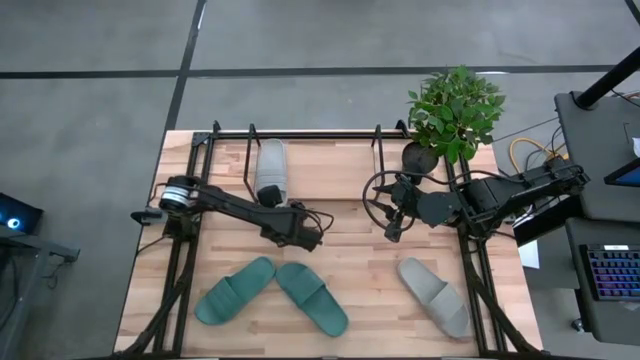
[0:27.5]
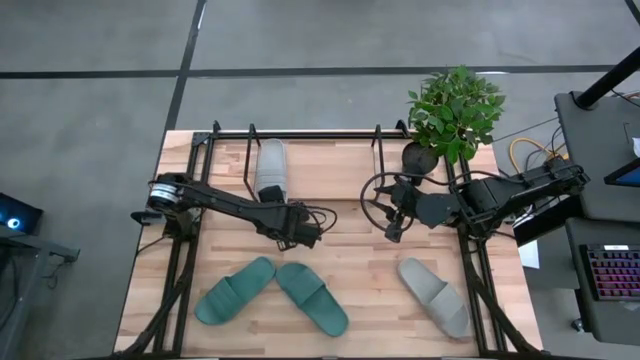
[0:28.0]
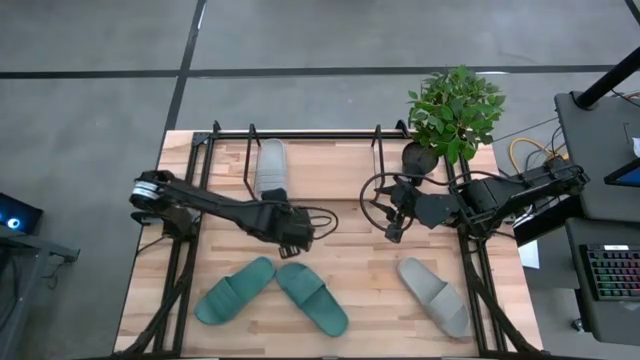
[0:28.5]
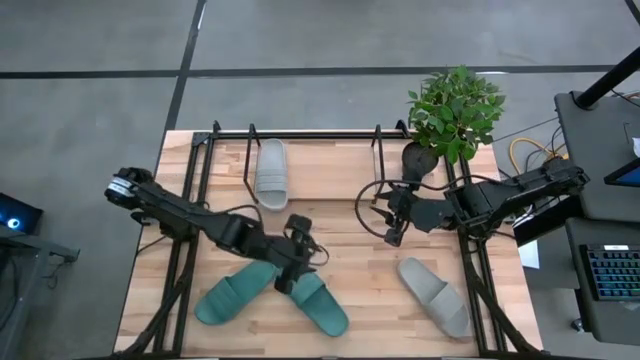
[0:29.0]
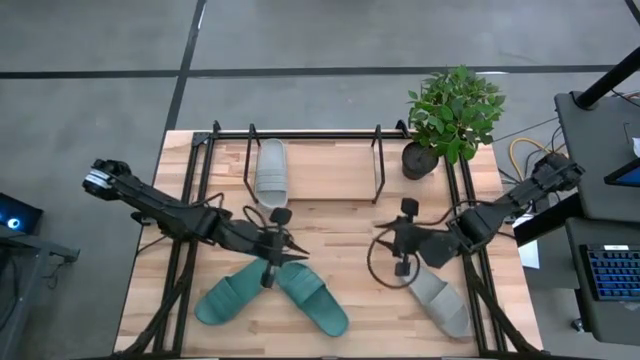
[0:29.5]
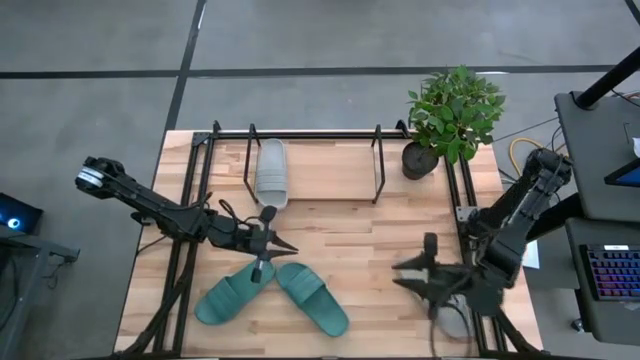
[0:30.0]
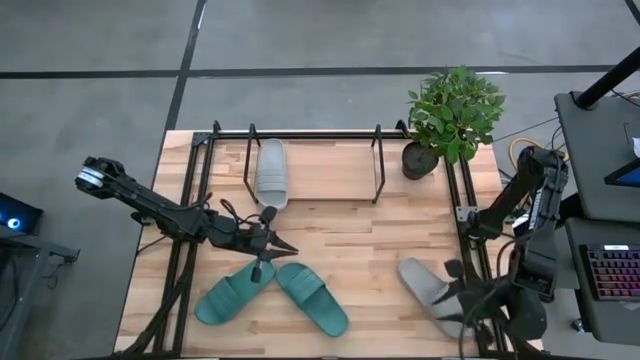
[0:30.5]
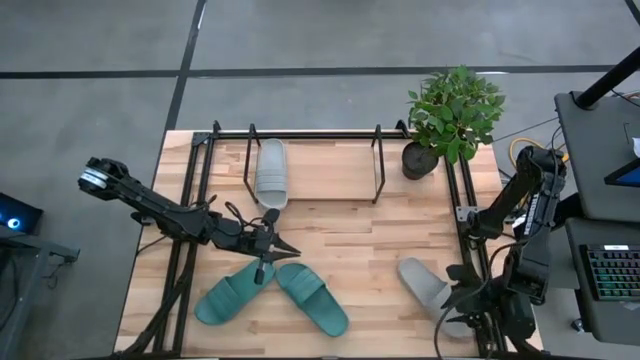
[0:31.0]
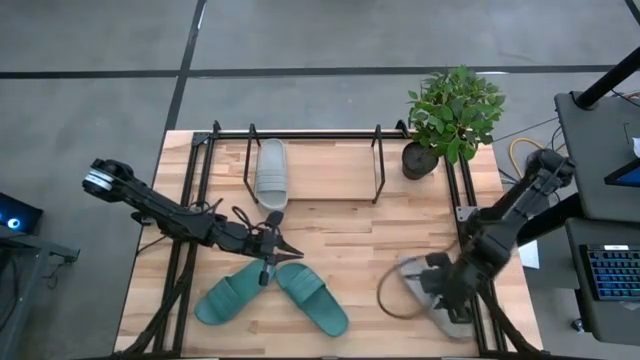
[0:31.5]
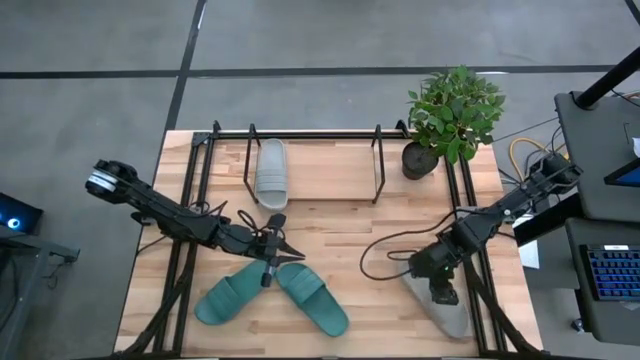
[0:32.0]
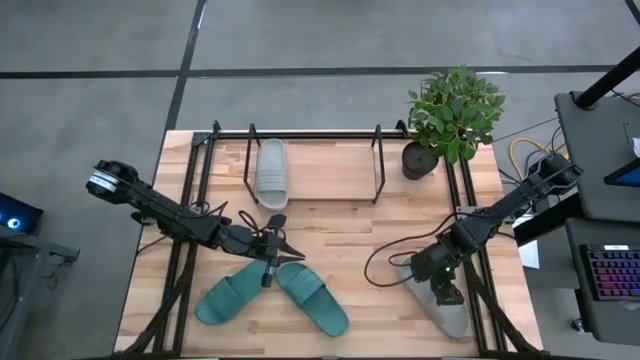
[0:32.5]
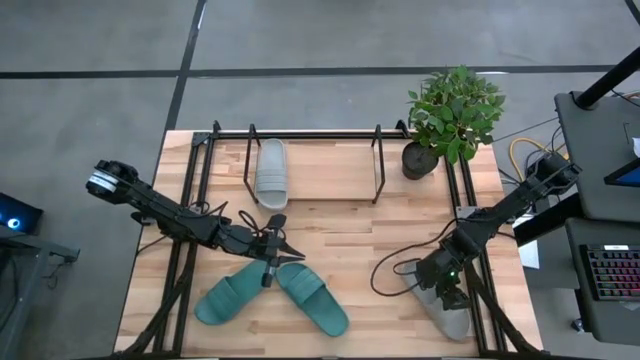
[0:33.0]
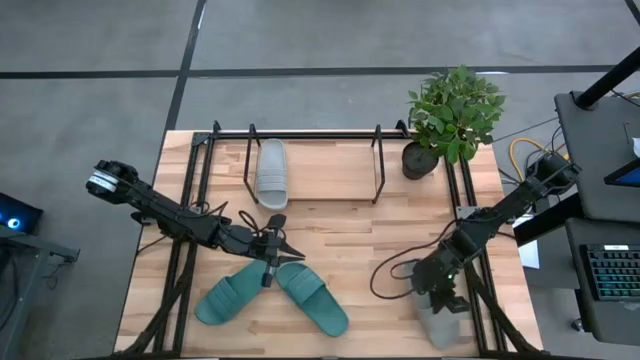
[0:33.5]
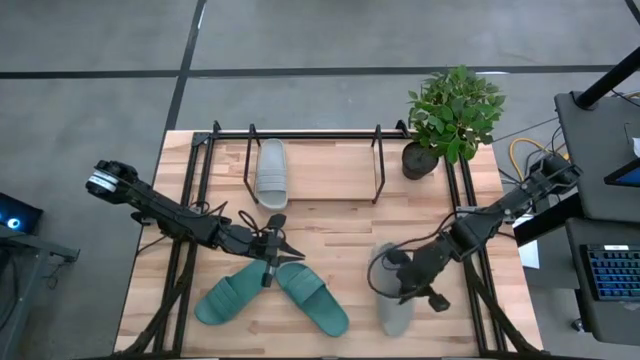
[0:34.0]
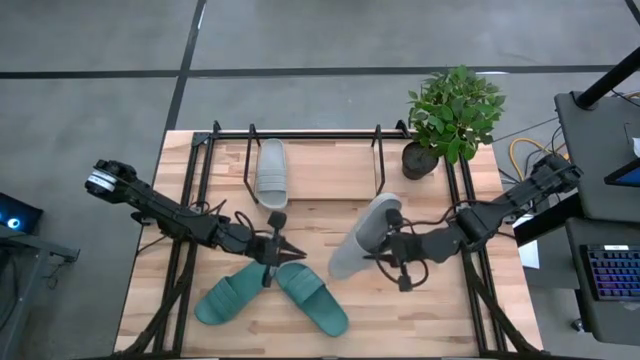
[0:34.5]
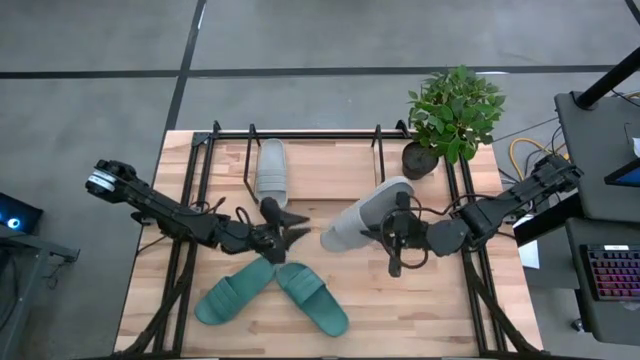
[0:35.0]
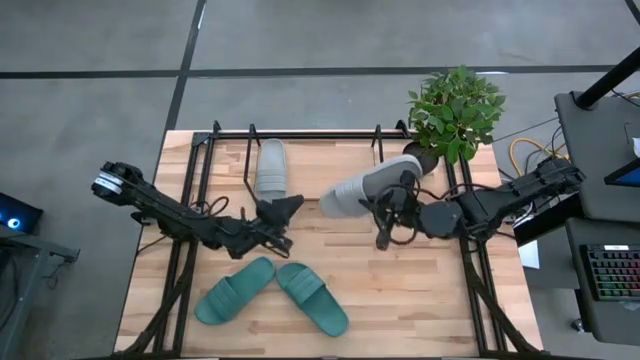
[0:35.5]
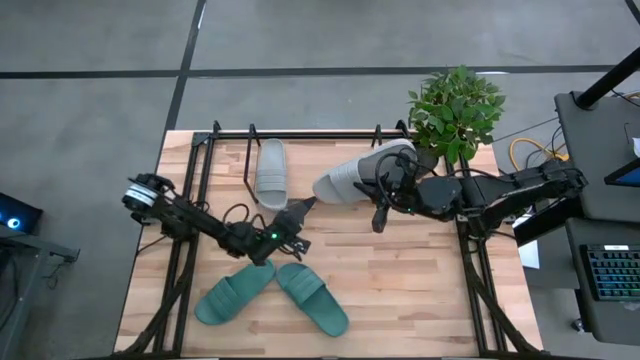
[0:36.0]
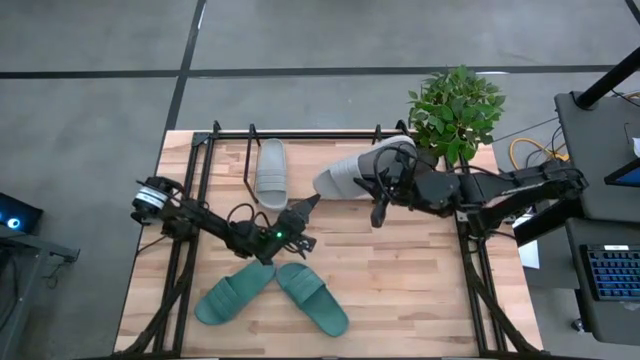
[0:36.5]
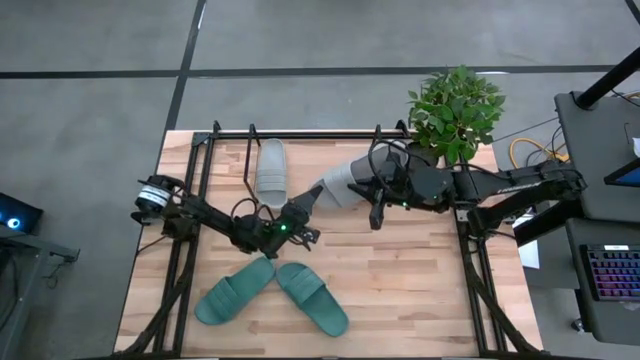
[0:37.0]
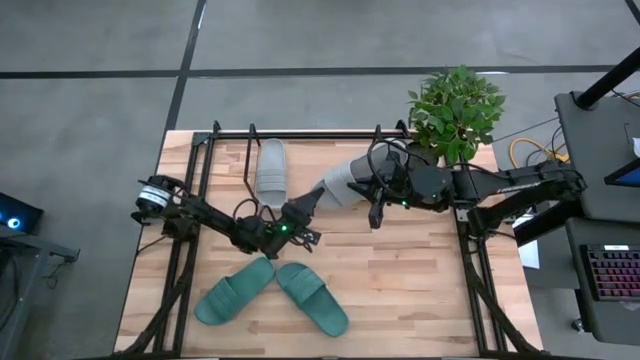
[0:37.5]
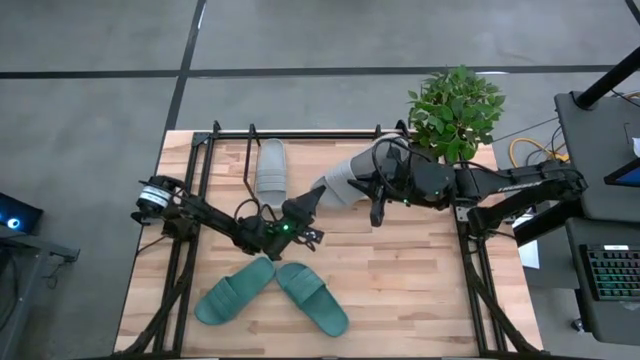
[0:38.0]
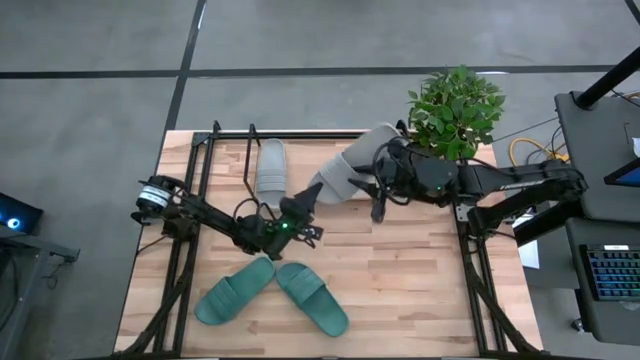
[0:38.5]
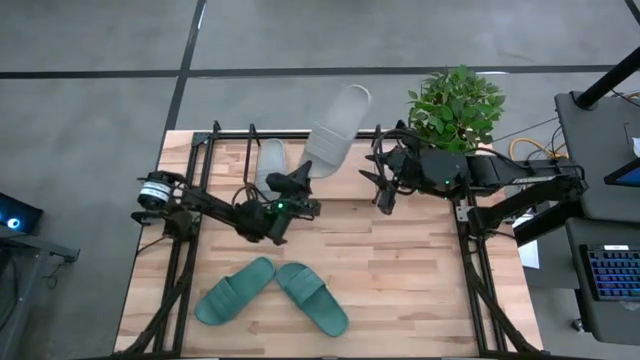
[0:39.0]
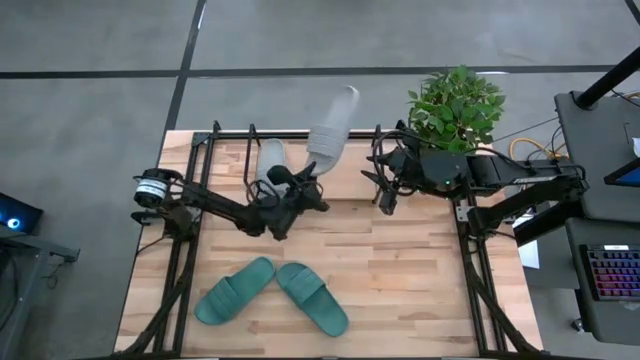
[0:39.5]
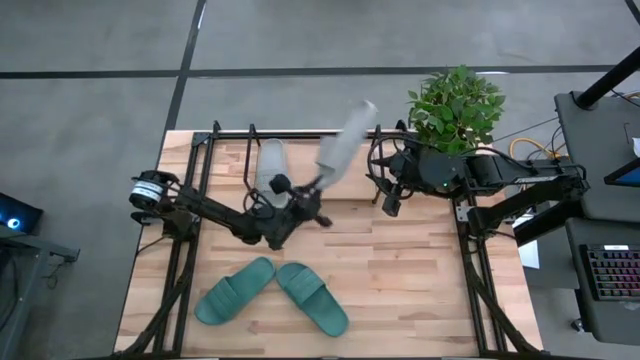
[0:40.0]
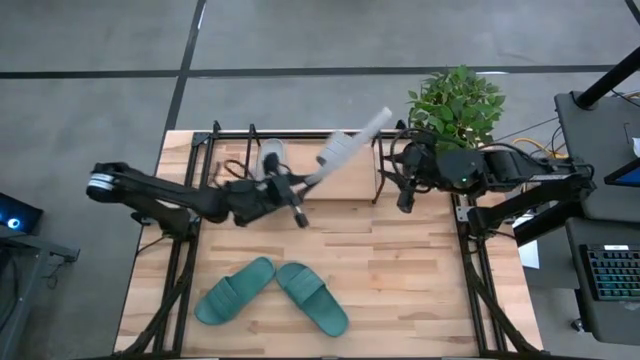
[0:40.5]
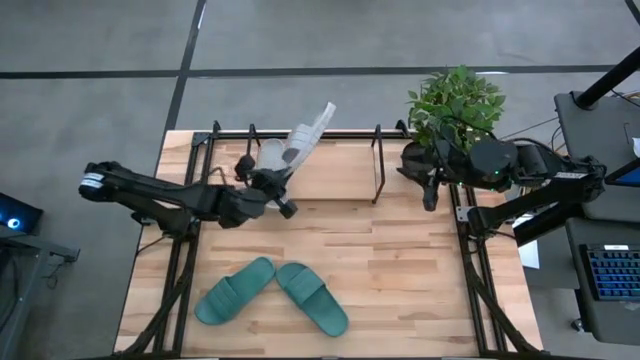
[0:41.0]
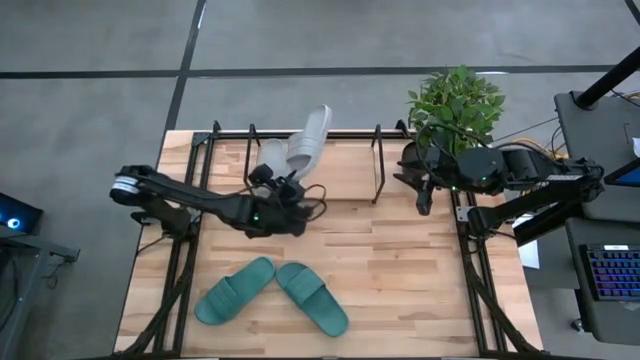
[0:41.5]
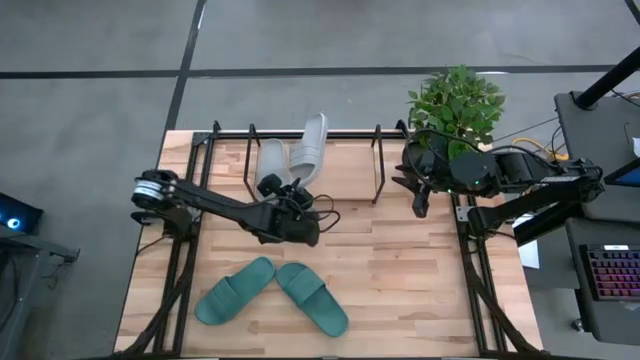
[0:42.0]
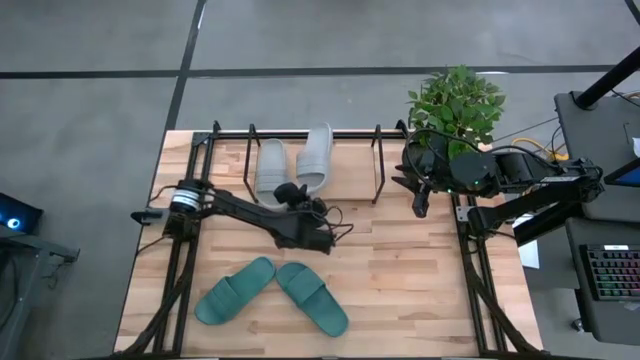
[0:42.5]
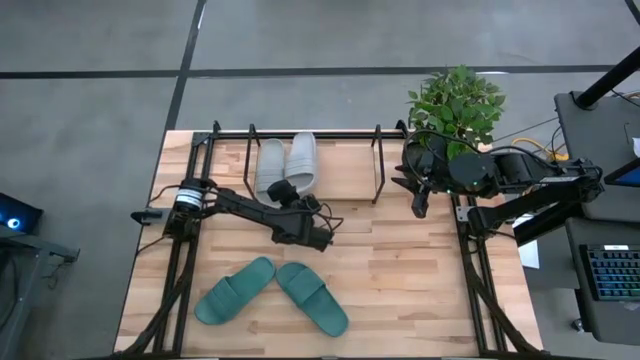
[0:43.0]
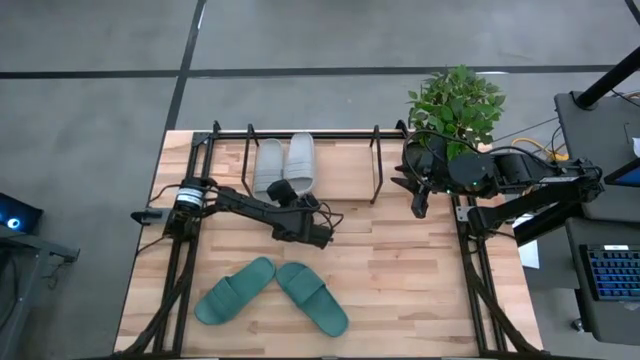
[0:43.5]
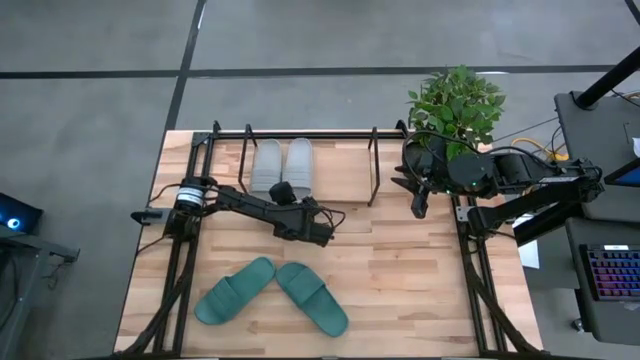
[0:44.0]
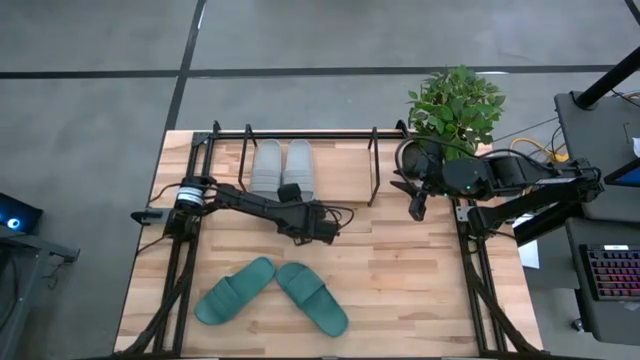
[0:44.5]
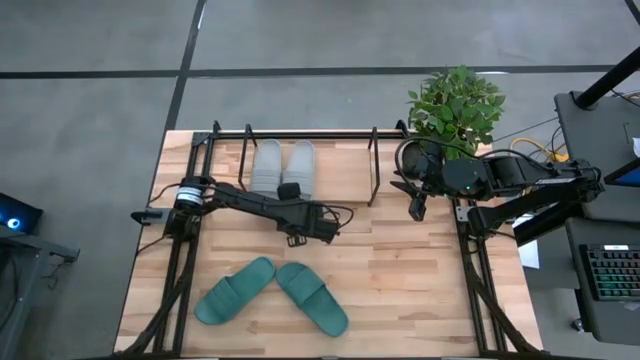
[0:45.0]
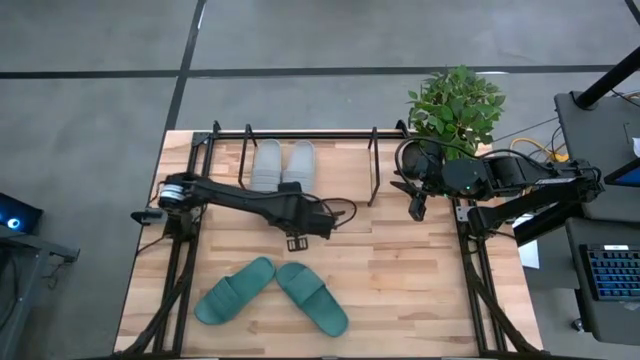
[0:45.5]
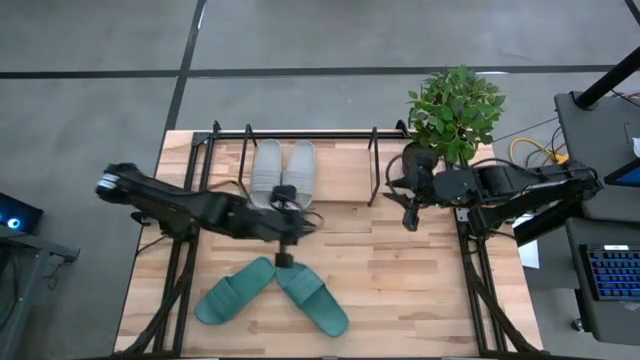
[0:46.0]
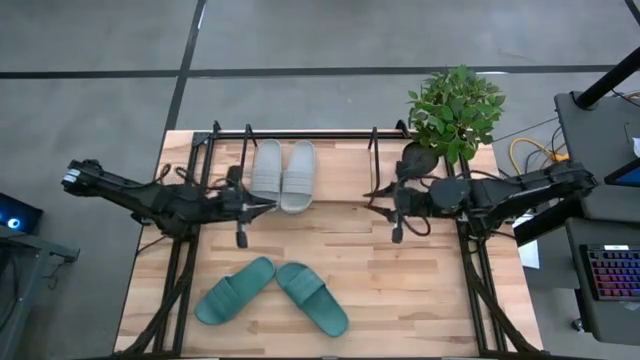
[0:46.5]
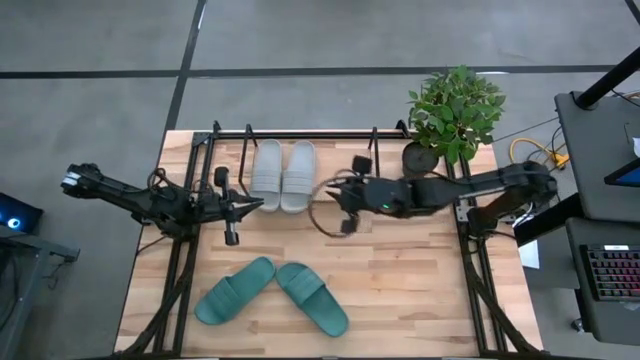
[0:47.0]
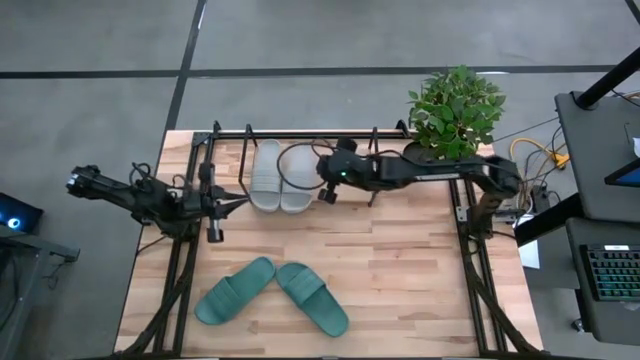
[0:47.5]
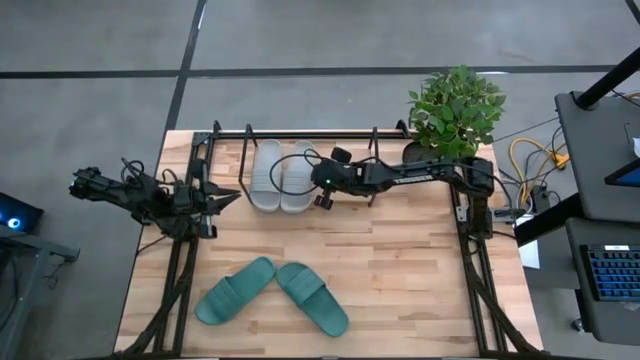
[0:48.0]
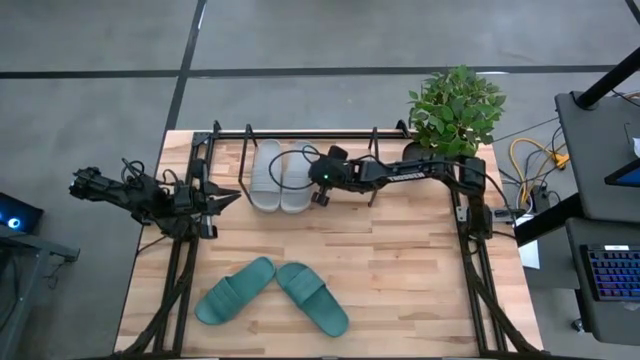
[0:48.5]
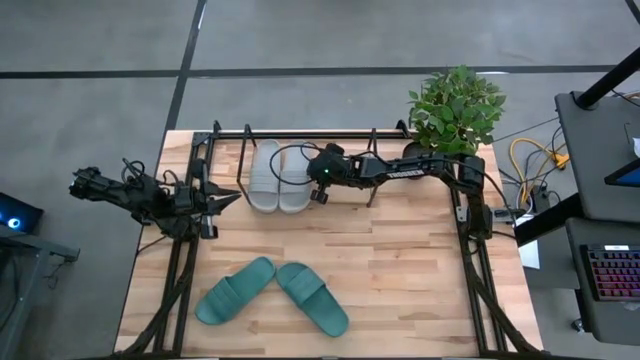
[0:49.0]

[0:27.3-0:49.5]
Task: Pick and place slides into the shelf
Put the gray slide on the shelf
